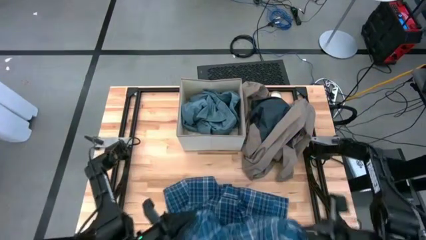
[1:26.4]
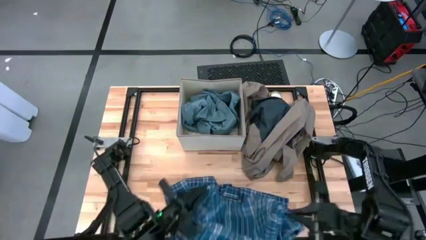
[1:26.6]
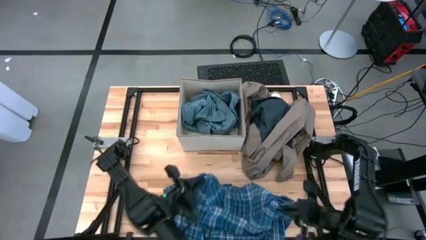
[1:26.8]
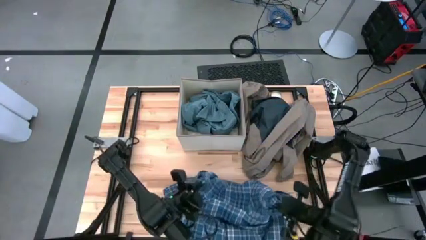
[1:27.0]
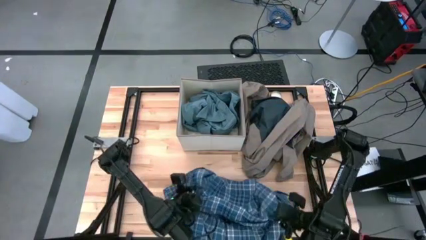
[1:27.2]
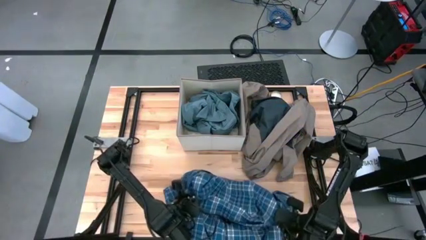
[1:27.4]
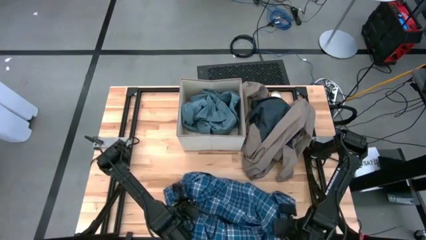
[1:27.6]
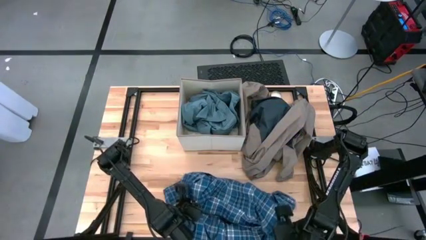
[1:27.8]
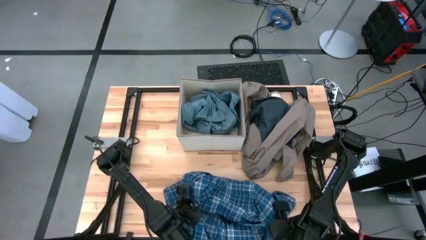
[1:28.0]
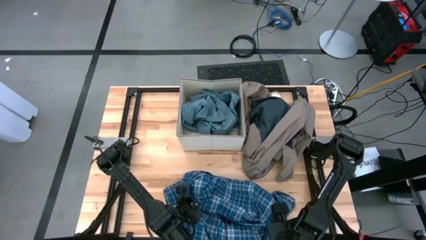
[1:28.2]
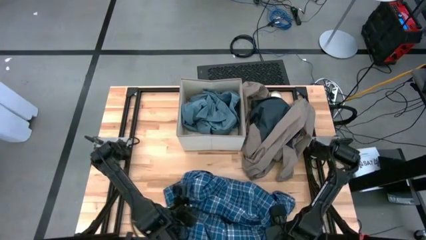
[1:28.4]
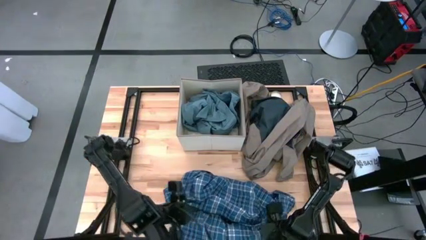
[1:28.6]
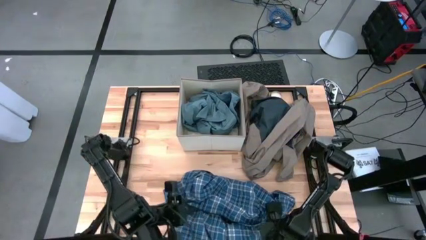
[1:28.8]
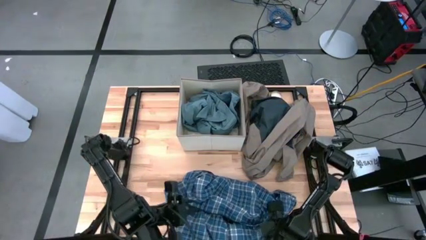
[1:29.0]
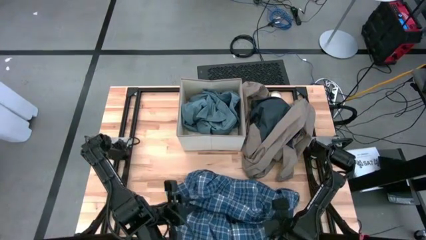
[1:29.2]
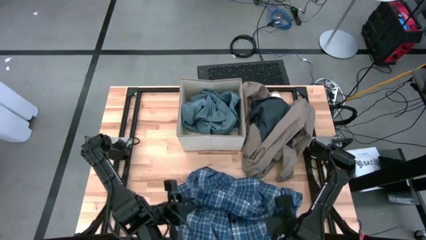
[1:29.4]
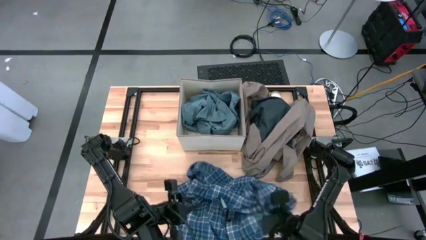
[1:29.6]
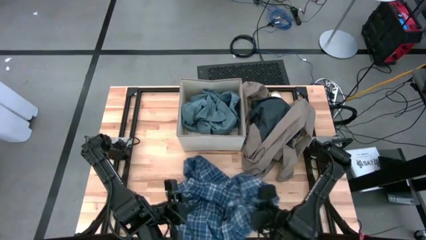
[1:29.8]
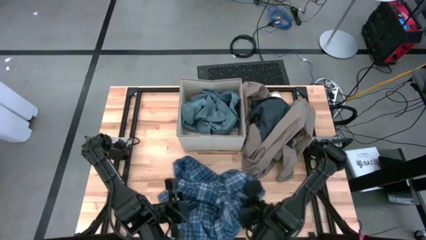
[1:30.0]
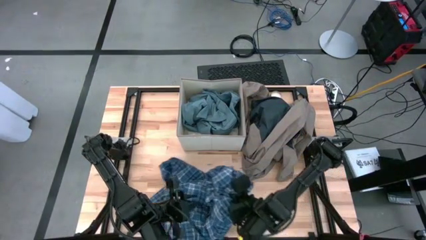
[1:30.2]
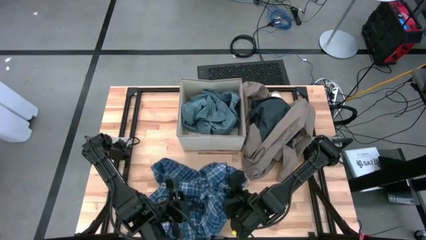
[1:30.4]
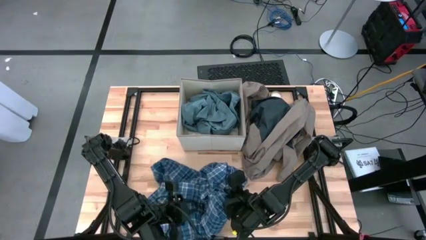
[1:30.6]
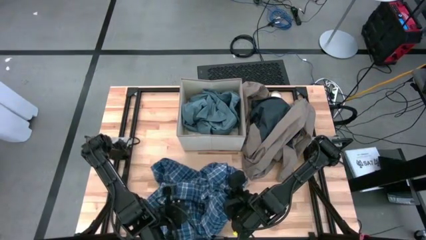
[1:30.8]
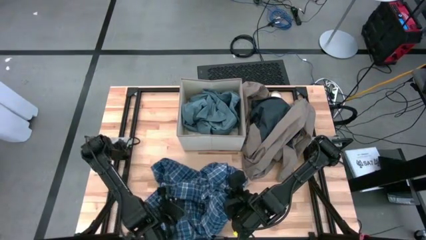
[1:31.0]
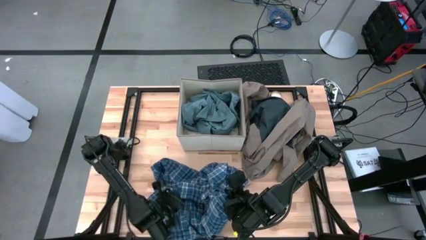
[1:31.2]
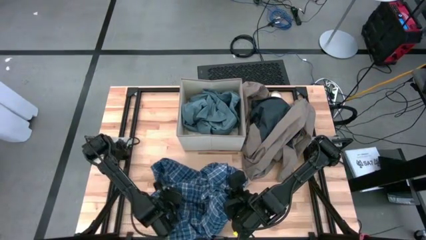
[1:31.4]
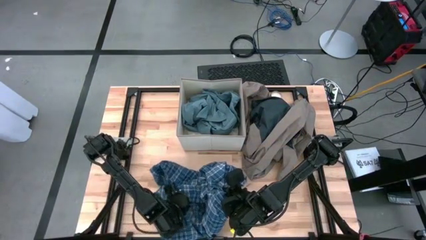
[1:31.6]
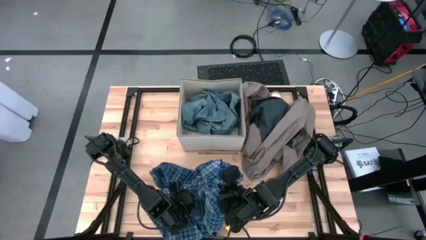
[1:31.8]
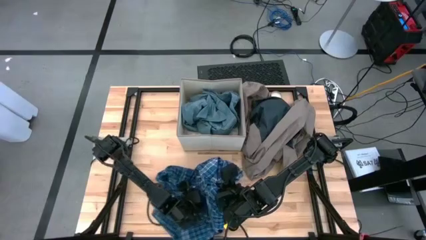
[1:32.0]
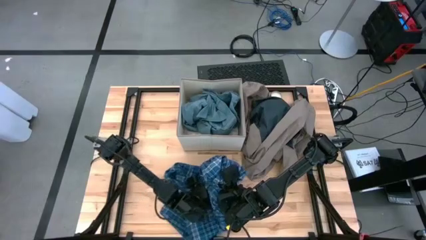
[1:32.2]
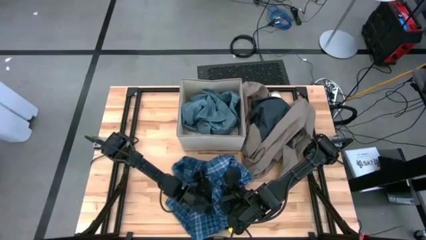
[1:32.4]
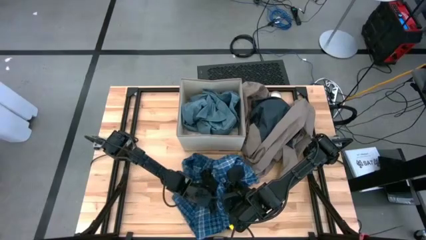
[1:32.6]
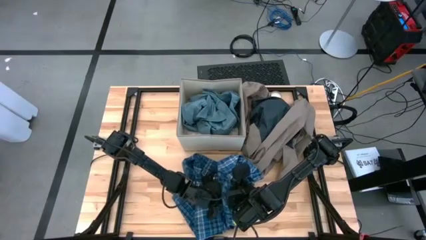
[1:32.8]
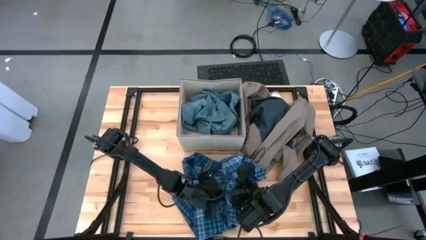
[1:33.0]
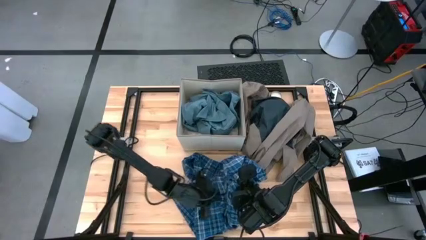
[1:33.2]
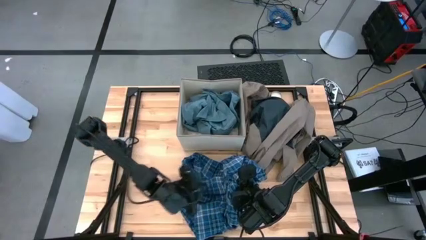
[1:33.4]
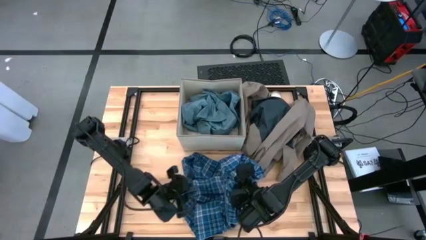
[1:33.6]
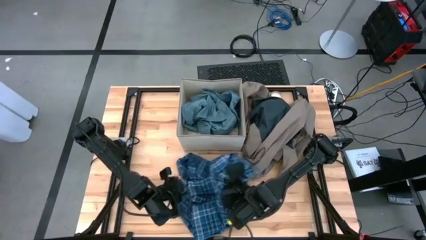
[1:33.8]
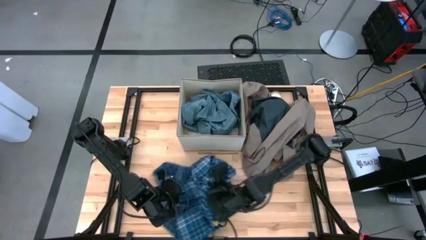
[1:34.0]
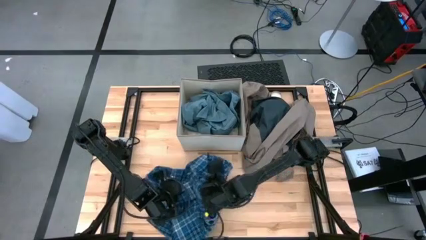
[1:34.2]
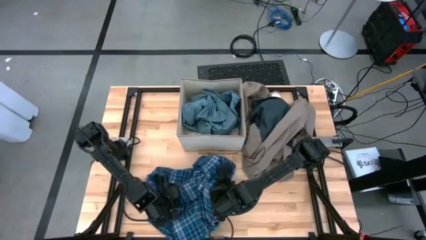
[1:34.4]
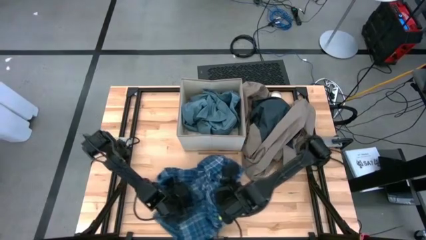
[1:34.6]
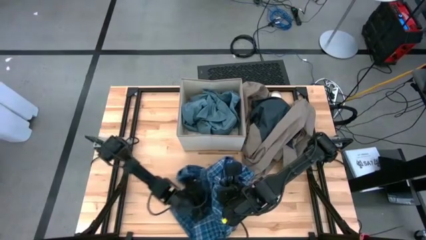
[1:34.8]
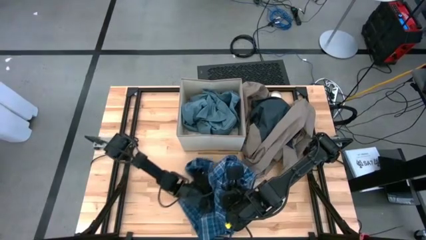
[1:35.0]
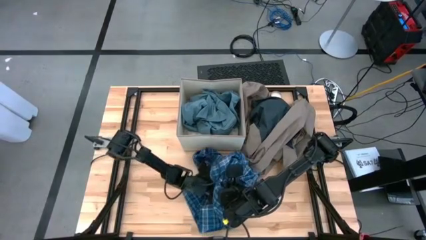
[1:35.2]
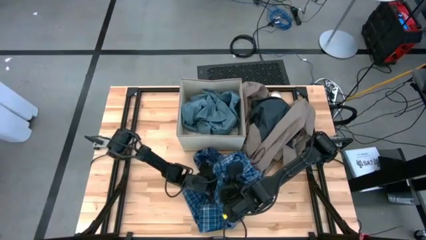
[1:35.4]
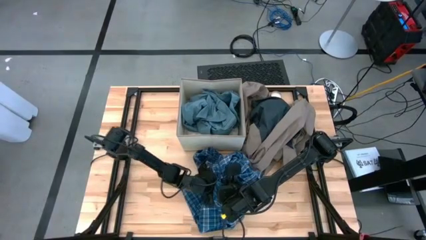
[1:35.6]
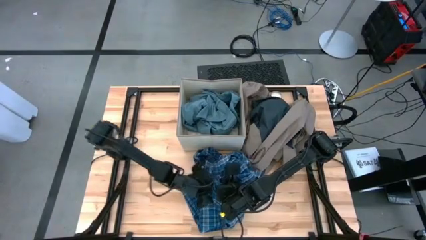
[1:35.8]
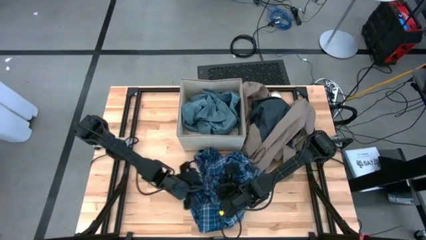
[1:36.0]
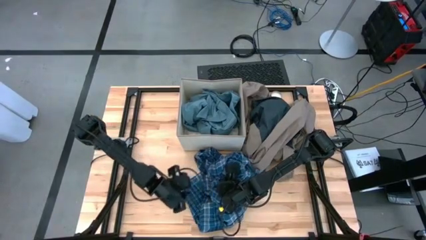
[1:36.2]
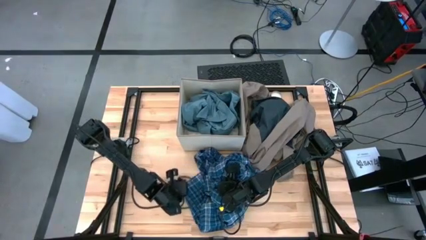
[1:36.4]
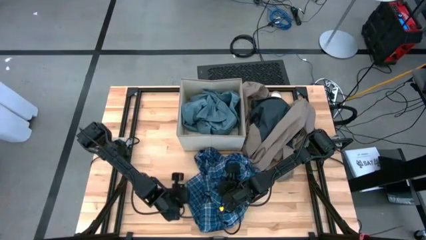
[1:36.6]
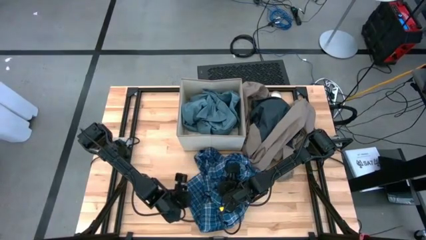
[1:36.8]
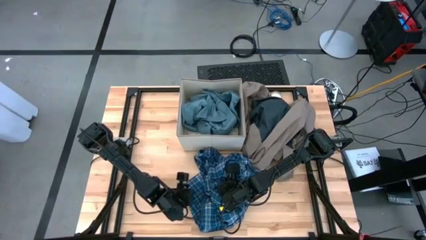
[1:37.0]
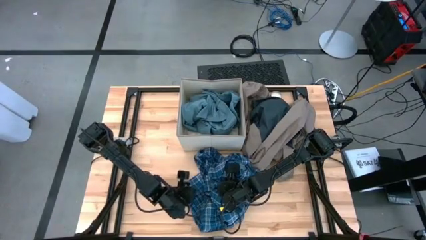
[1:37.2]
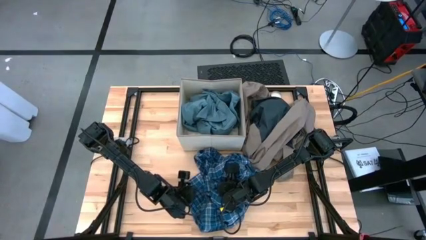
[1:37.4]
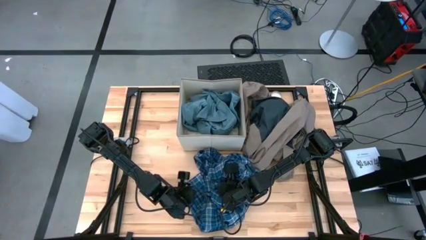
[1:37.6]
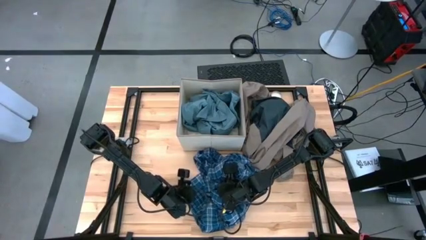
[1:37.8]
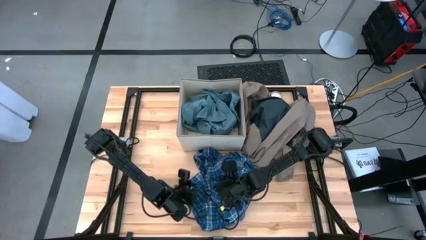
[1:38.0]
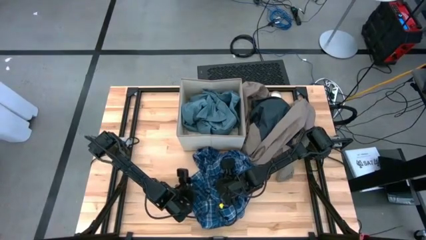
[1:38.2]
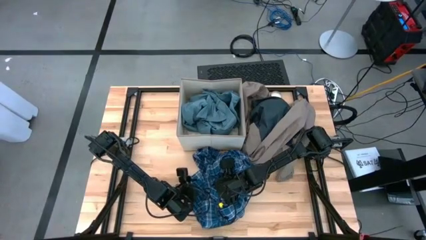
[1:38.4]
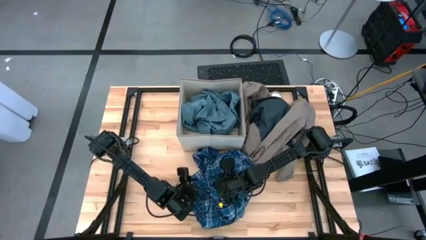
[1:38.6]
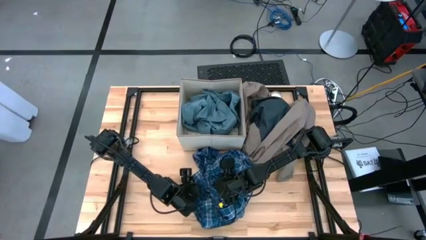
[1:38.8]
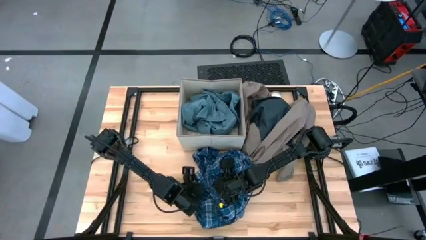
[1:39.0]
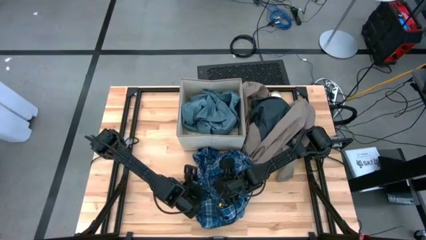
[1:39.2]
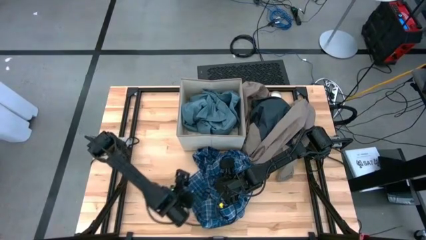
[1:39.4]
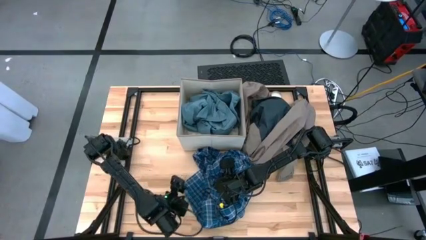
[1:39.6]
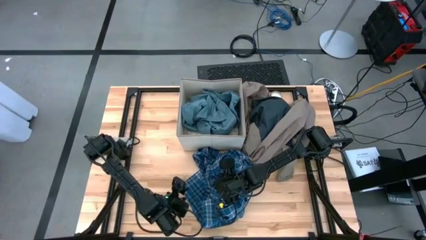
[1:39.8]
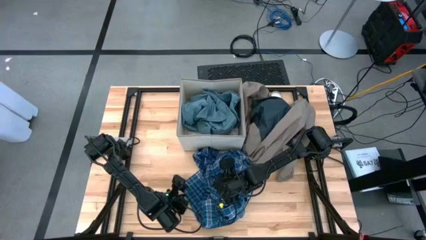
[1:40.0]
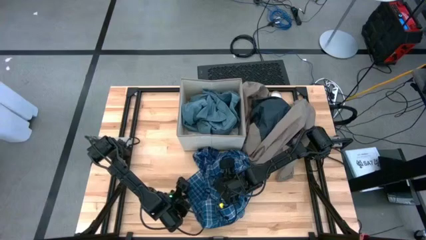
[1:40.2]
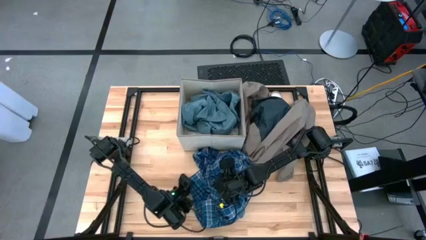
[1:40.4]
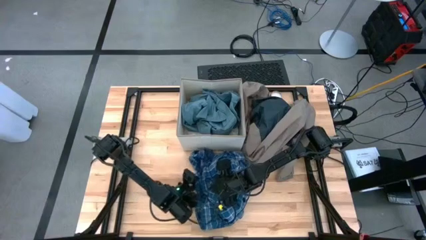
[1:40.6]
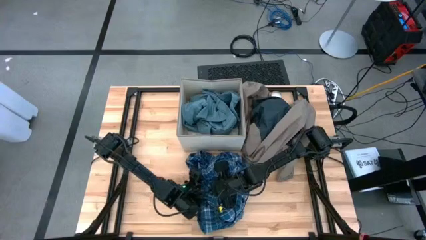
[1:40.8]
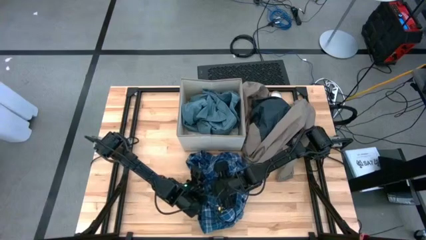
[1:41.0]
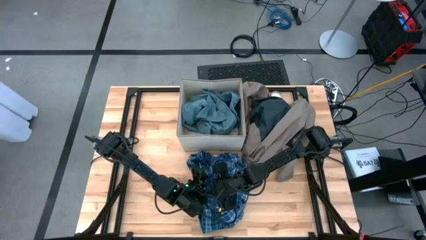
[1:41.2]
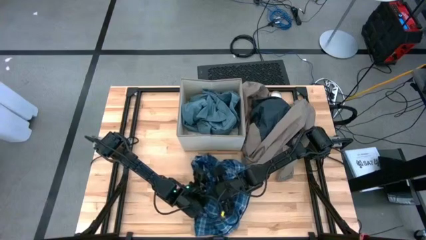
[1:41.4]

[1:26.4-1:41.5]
Task: Sort clothes
Put the blue polo shirt into the laundry organizer
